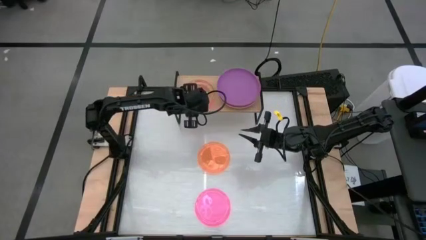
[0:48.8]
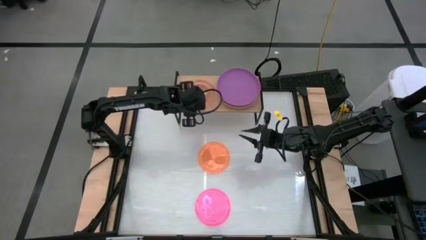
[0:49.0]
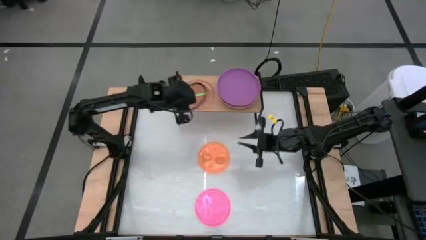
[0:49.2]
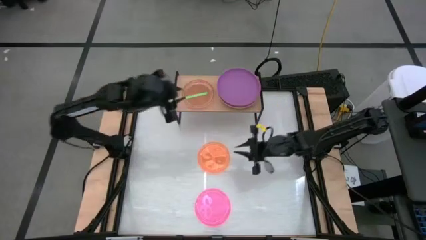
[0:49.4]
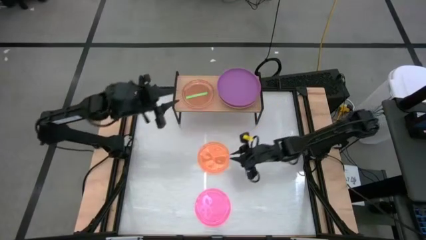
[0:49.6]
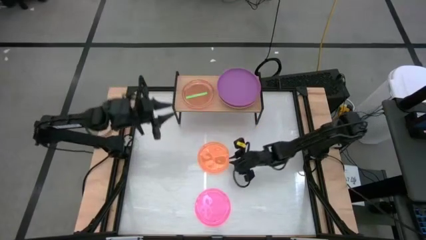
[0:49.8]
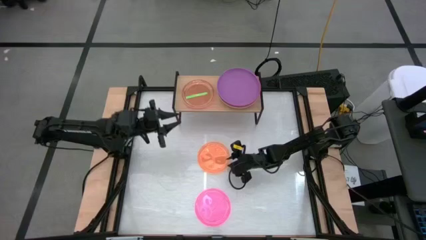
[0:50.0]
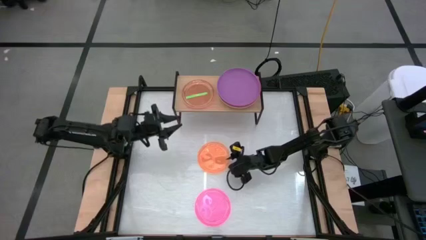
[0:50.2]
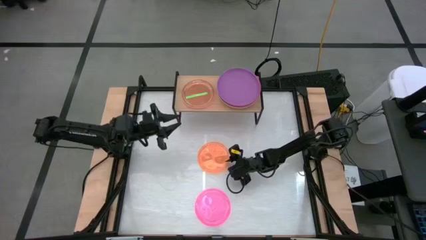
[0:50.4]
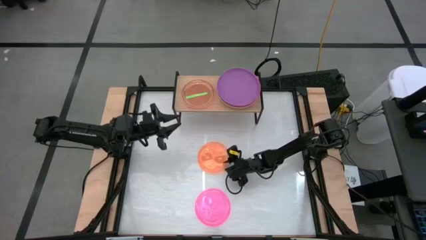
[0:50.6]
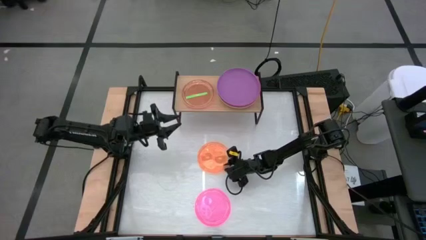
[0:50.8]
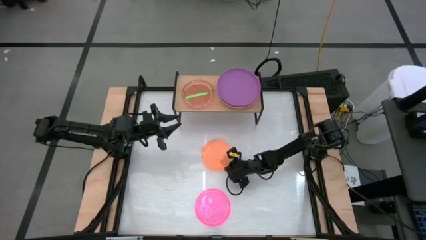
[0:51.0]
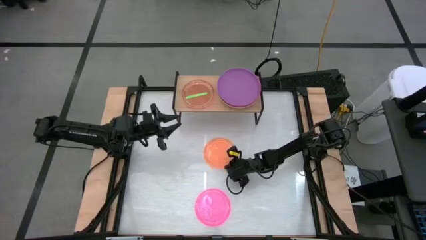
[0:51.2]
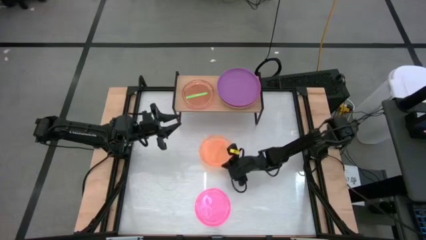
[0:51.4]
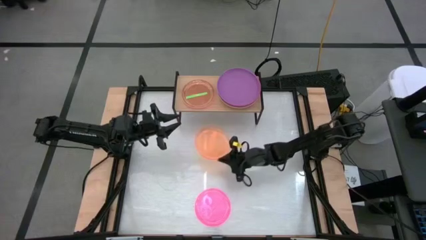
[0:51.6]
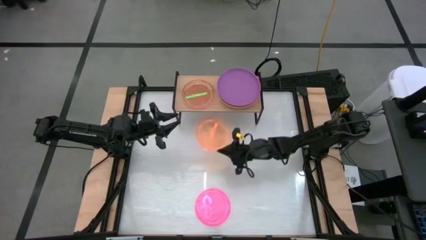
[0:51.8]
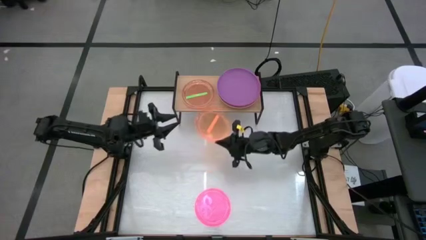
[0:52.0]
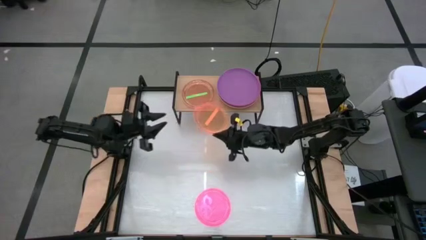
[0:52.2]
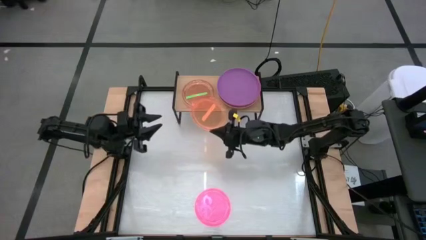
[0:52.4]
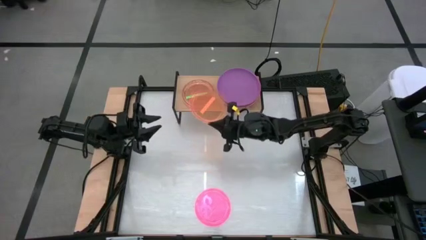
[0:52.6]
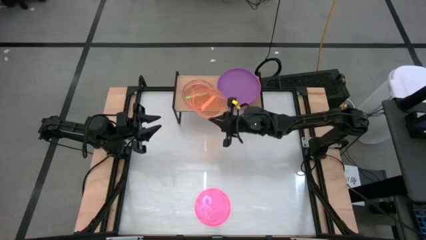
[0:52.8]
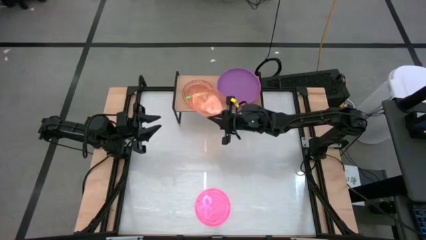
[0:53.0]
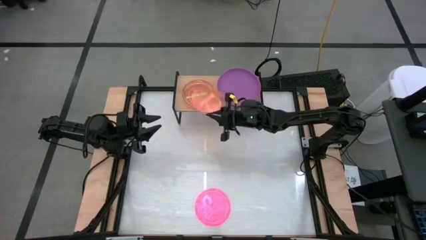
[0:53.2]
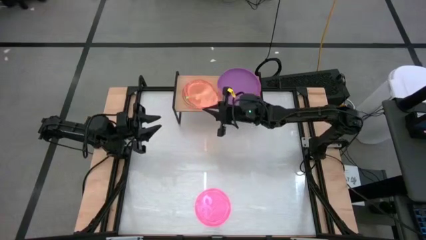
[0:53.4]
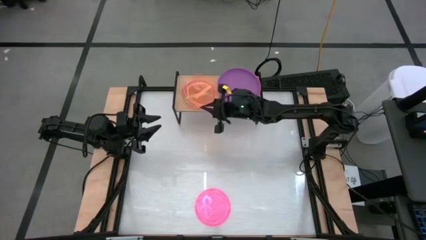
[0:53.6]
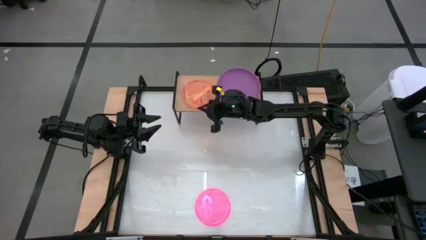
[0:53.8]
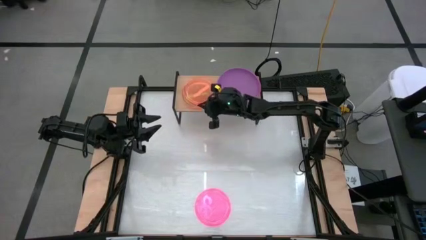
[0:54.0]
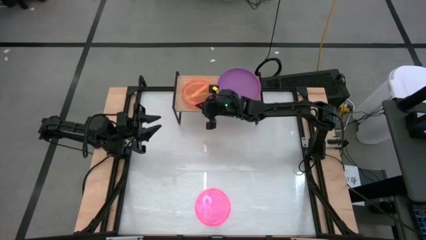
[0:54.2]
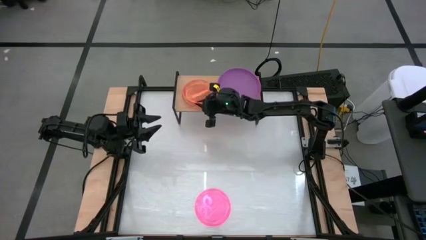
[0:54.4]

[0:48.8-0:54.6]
Task: Place and stack plates onto a shelf
Stack the orange transparent plate on top of the green transparent plate on the shelf

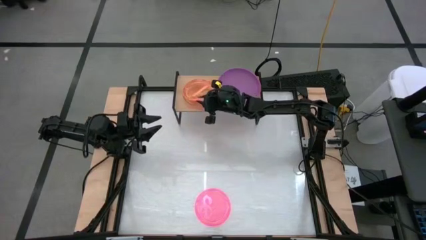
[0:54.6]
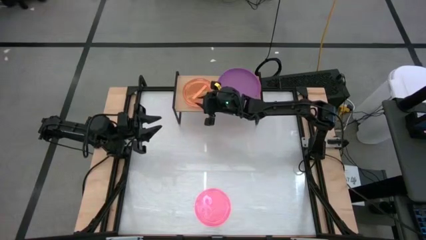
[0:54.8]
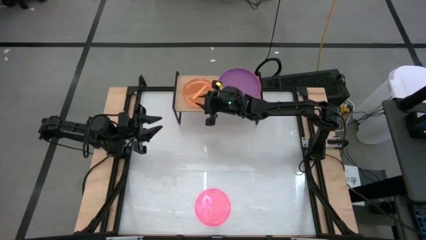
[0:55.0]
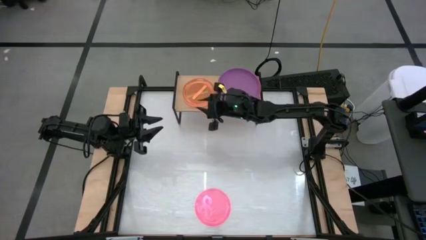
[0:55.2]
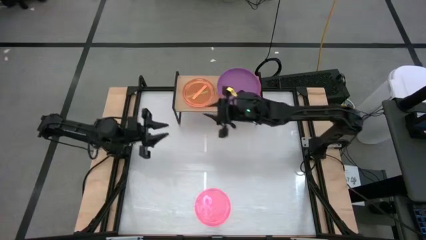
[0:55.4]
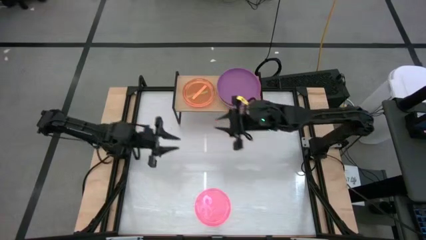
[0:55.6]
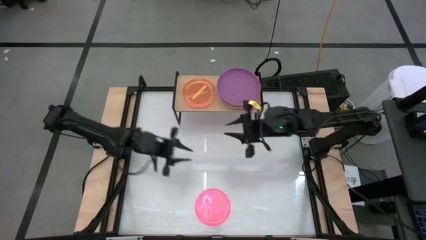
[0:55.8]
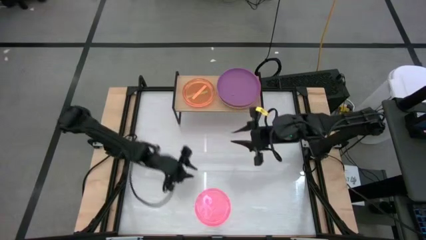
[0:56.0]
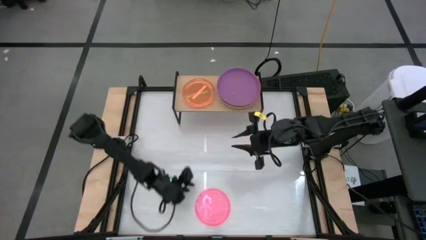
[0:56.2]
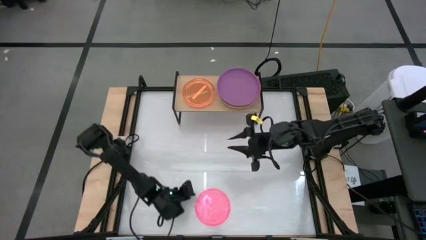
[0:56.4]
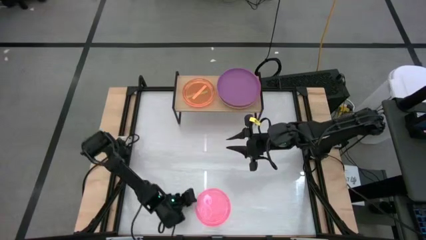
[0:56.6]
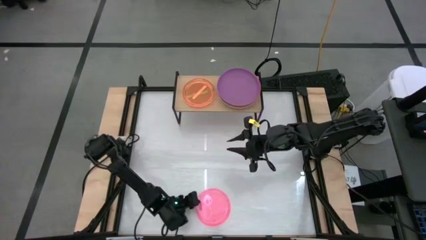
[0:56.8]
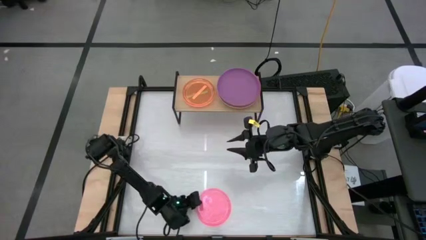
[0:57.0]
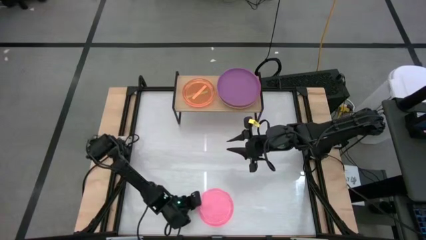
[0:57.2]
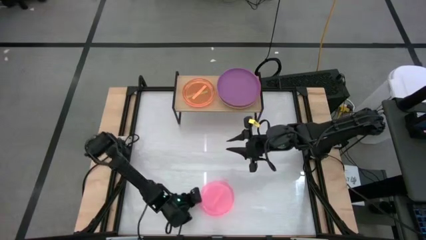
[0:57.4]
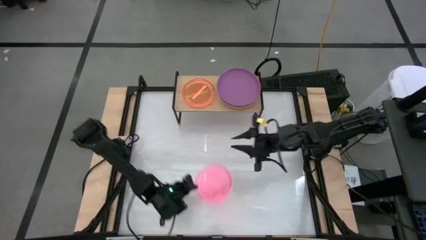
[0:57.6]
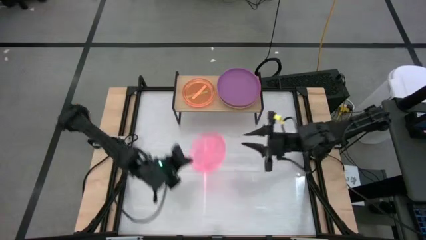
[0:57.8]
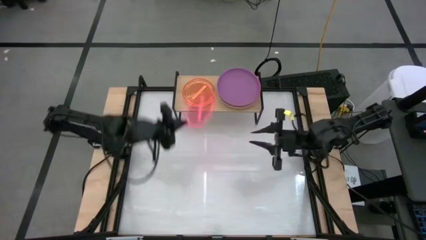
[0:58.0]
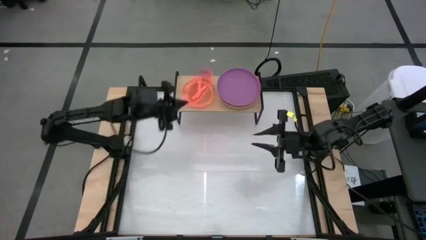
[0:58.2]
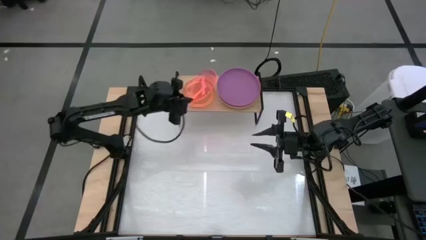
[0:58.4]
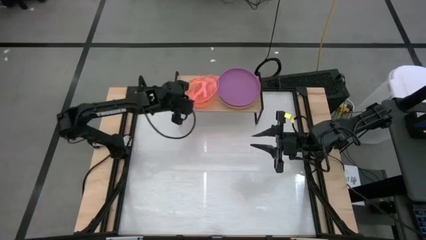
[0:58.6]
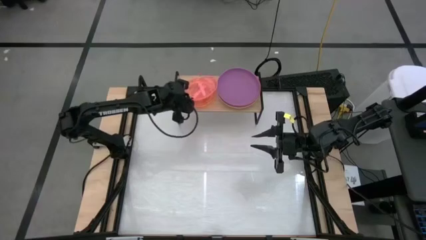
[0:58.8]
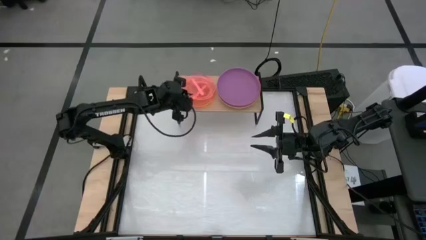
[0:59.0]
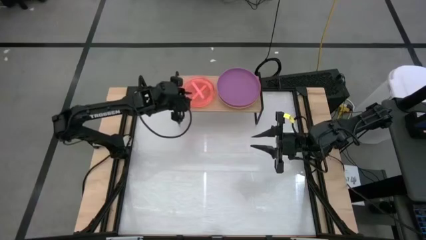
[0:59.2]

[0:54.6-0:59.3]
Stack the pink transparent plate on top of the orange transparent plate on the shelf

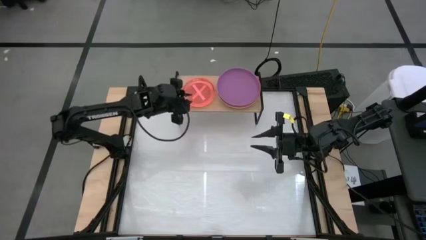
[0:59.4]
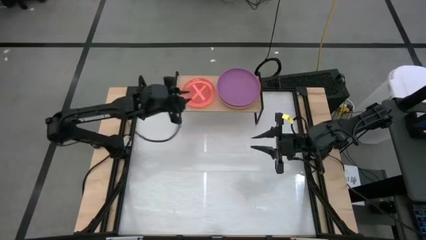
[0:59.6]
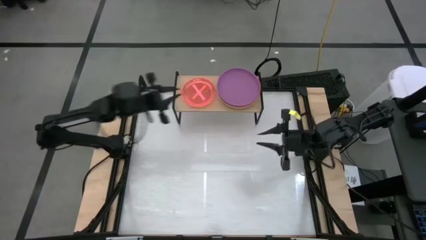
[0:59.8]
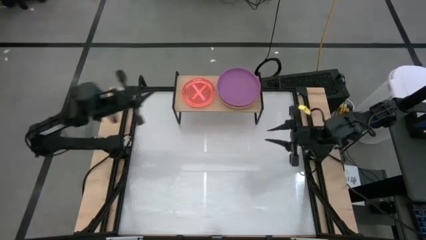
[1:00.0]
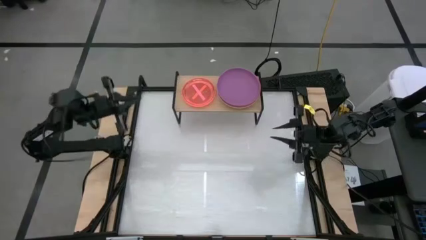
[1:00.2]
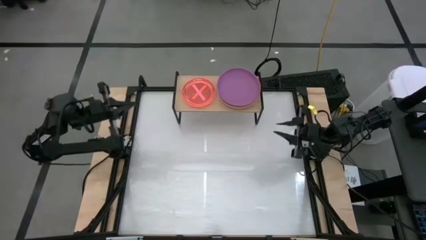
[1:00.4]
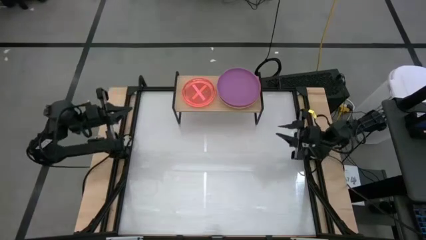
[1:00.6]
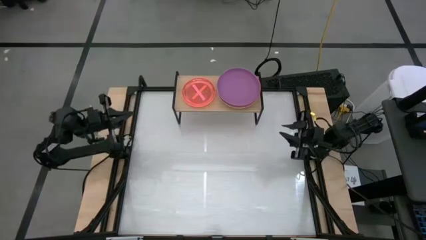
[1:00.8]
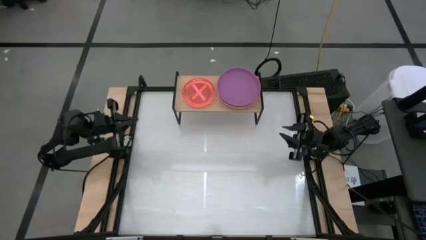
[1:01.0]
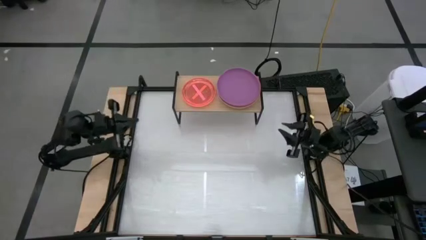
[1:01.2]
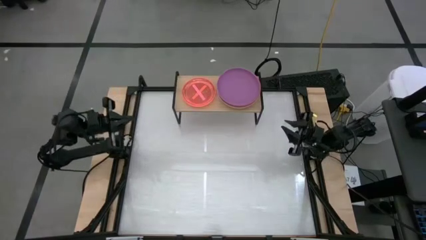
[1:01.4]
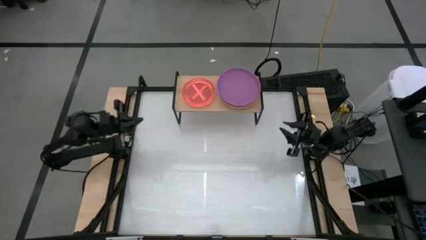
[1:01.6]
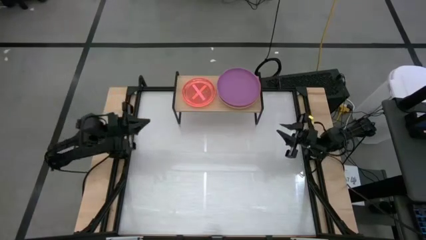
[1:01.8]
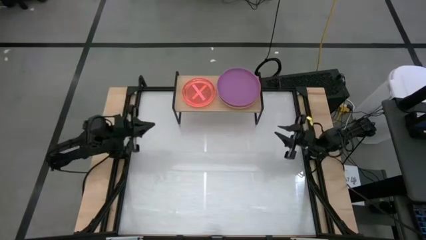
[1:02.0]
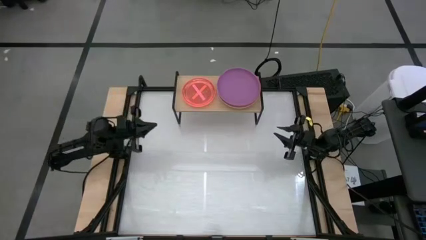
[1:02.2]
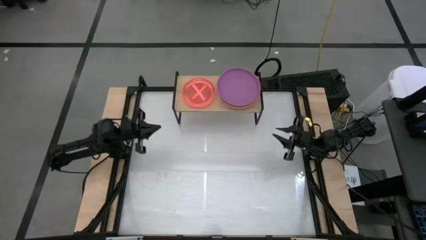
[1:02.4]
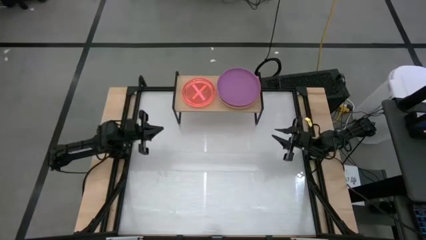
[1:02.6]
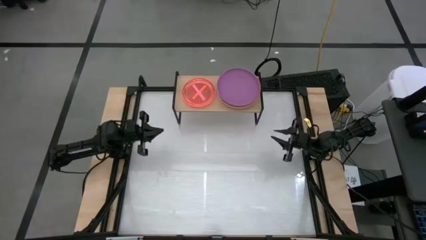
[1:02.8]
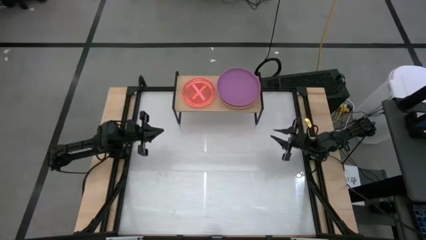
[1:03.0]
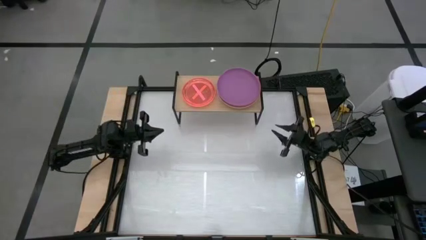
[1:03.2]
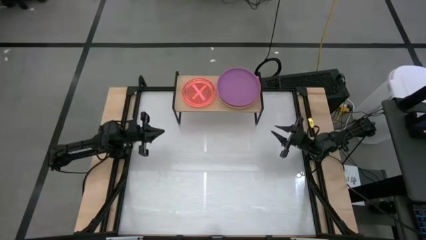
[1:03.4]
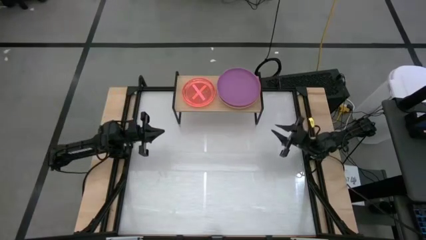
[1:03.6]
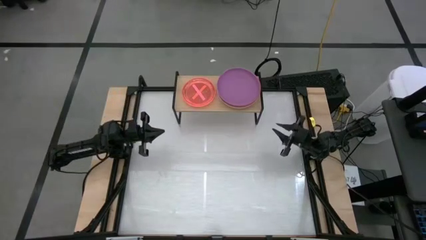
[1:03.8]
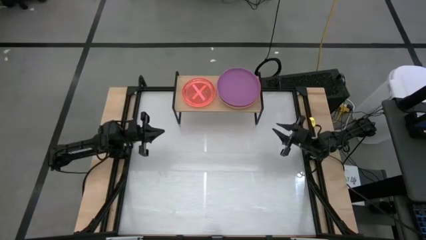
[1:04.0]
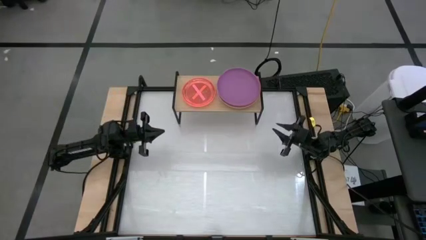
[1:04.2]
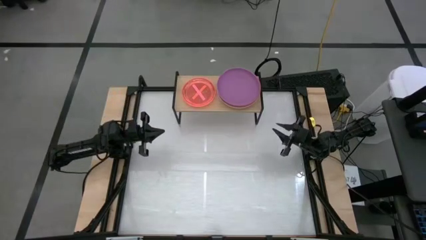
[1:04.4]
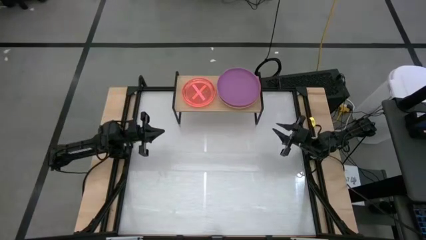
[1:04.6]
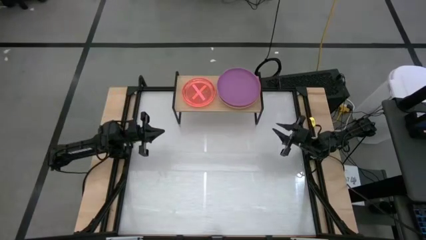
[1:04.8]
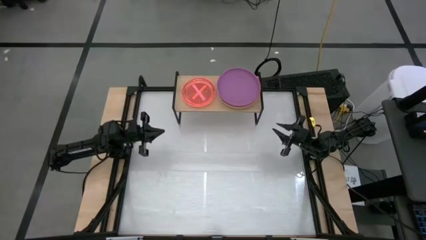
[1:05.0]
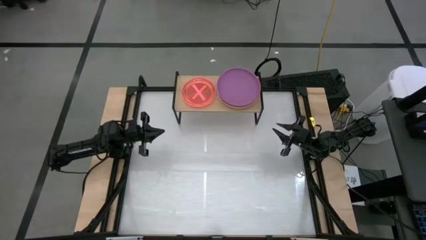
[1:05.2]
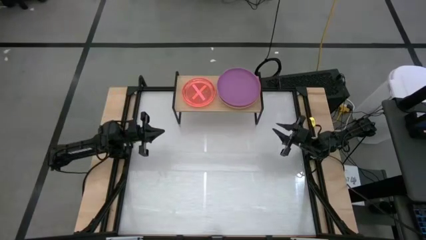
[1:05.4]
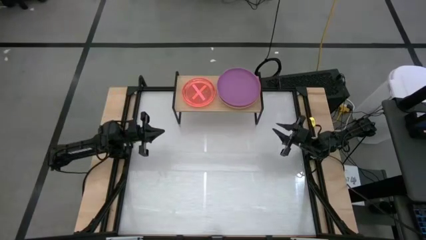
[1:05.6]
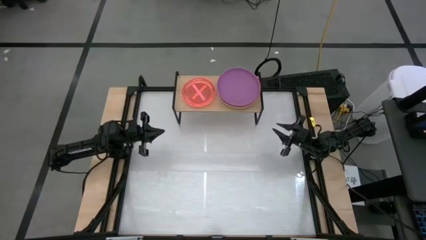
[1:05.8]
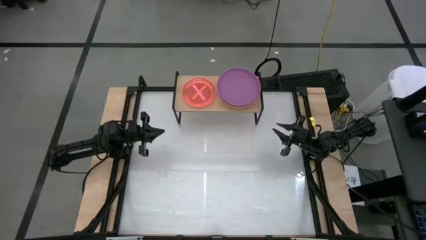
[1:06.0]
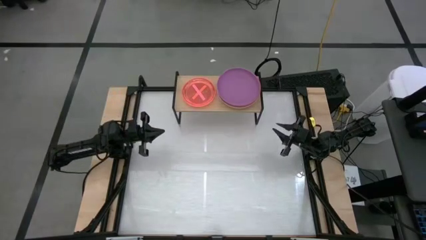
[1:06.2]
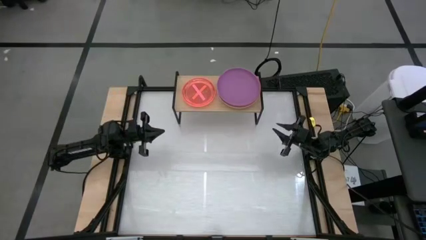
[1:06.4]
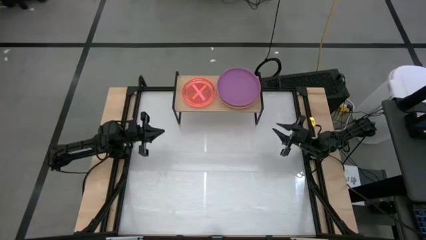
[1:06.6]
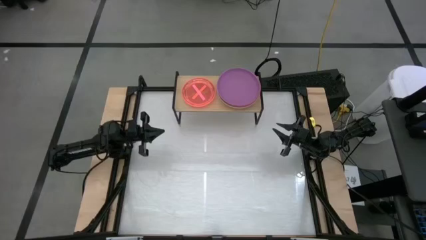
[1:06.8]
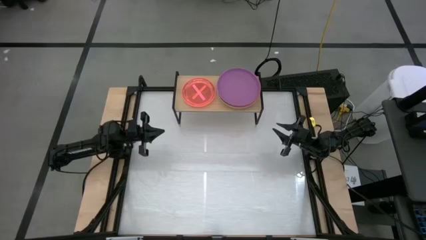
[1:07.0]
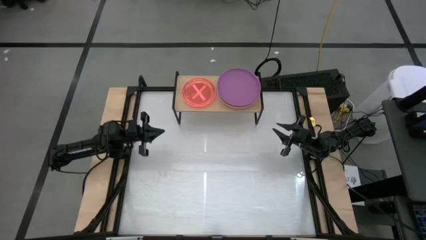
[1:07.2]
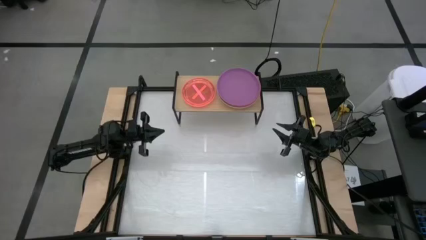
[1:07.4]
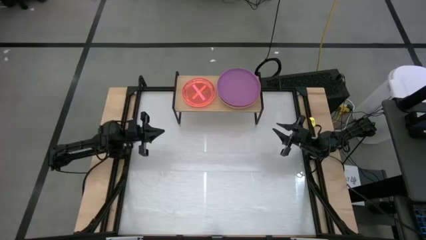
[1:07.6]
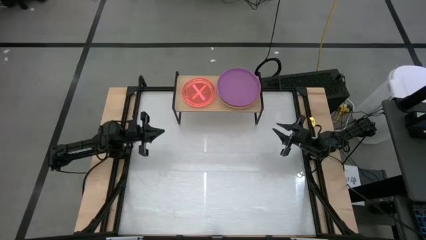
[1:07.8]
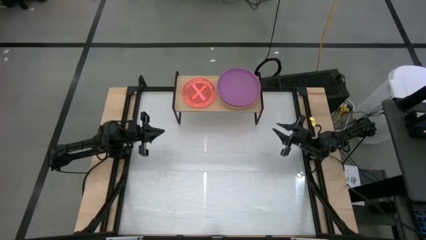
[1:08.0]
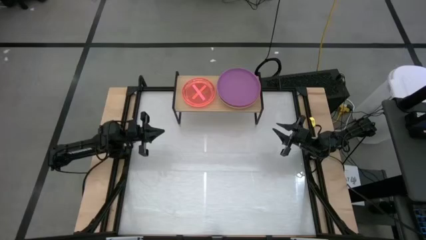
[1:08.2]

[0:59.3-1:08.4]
Return to Home Position
